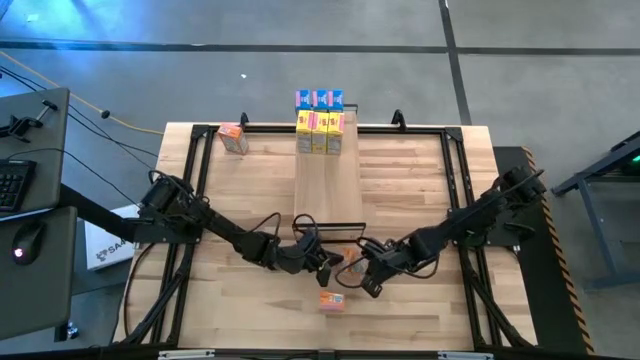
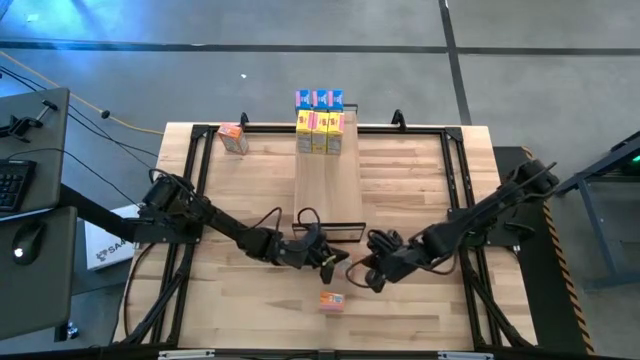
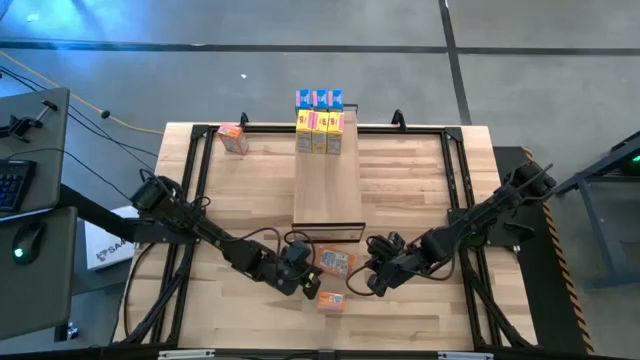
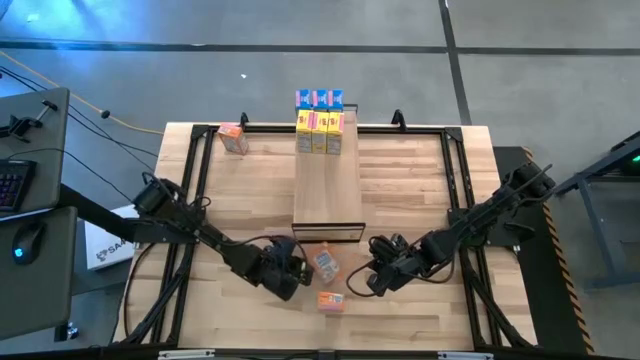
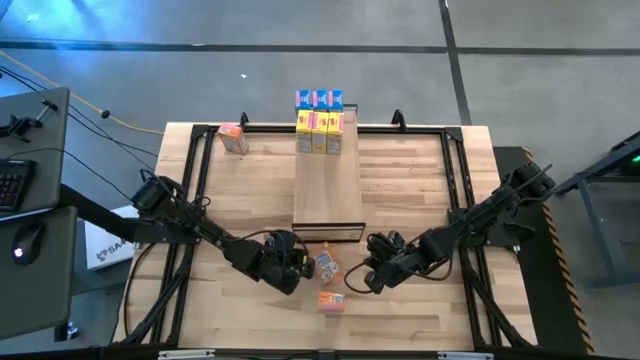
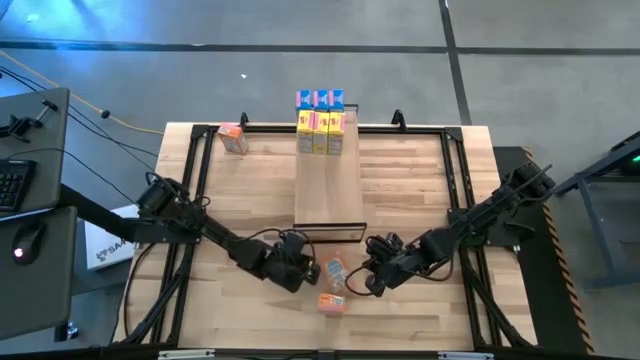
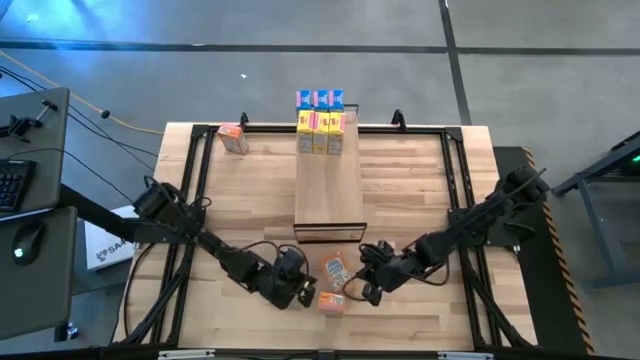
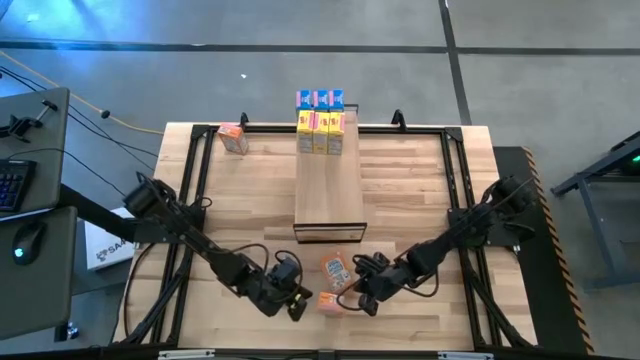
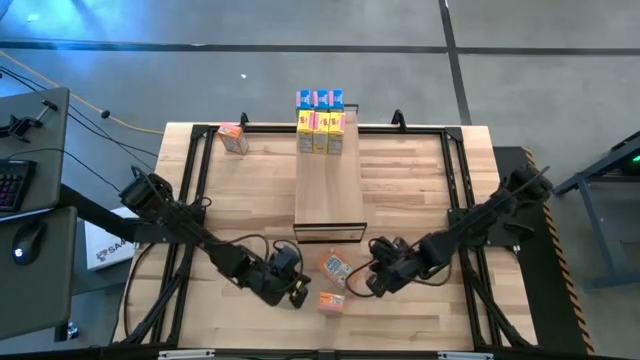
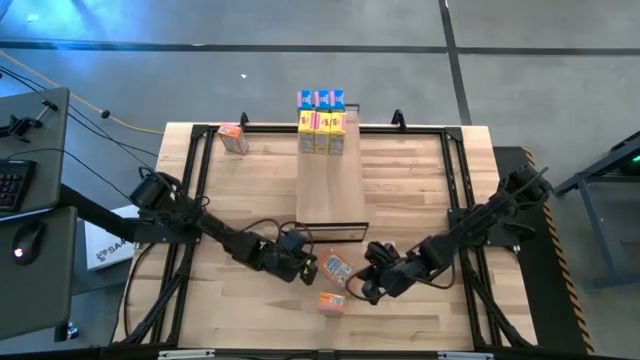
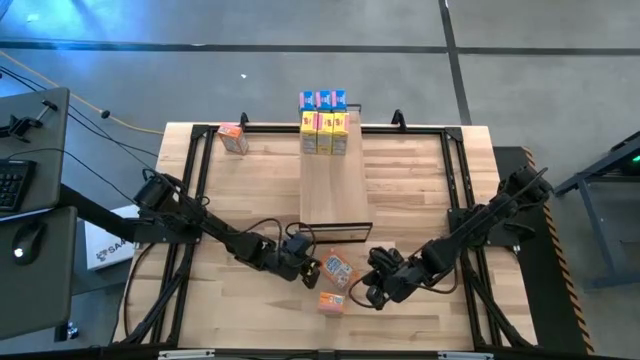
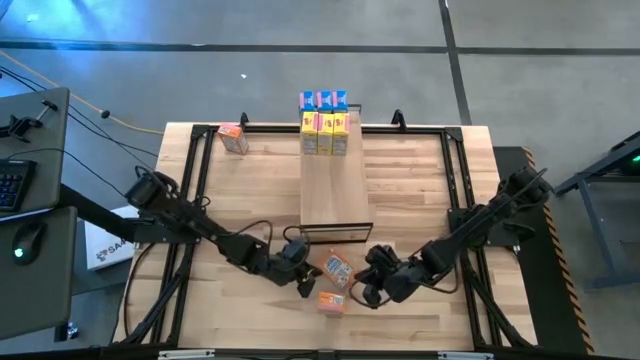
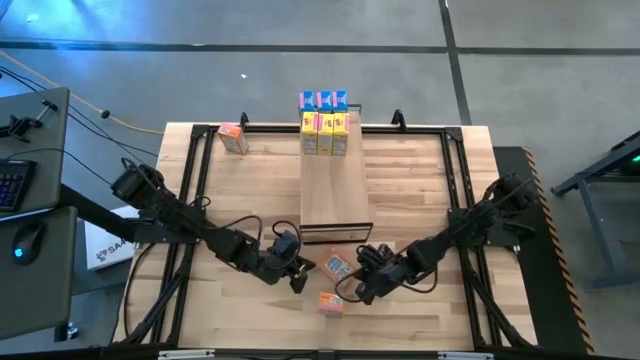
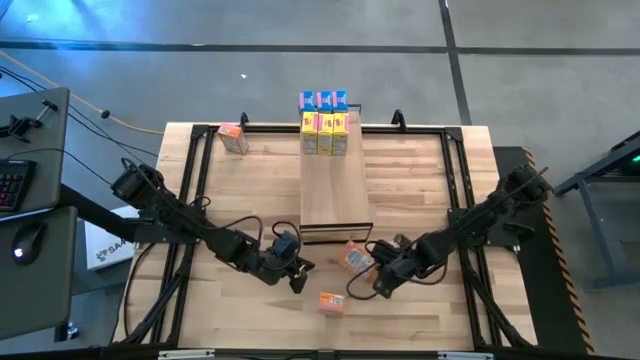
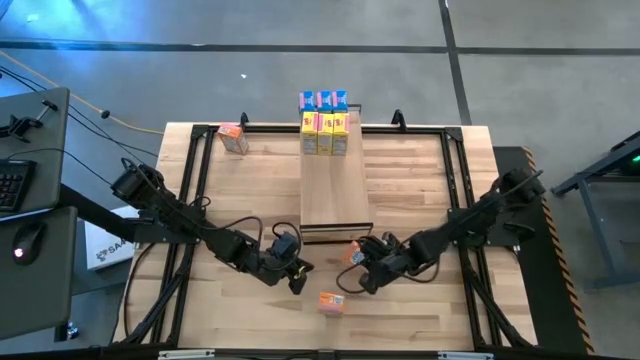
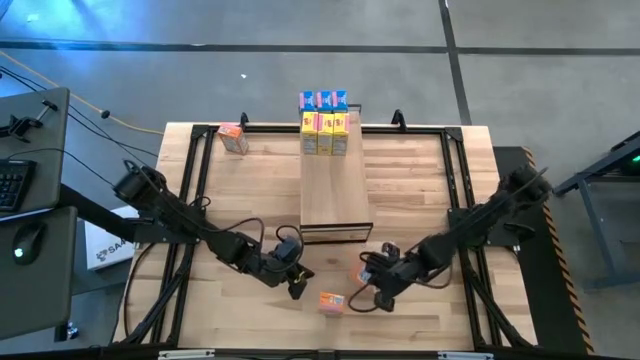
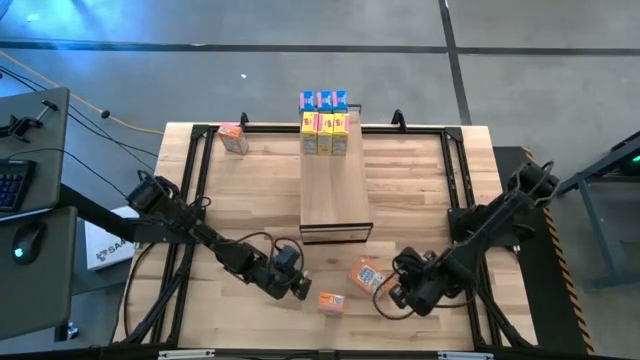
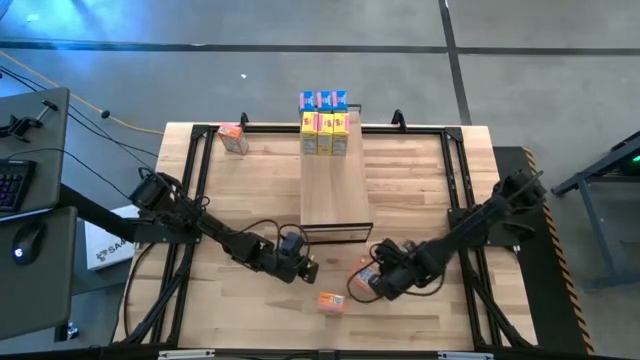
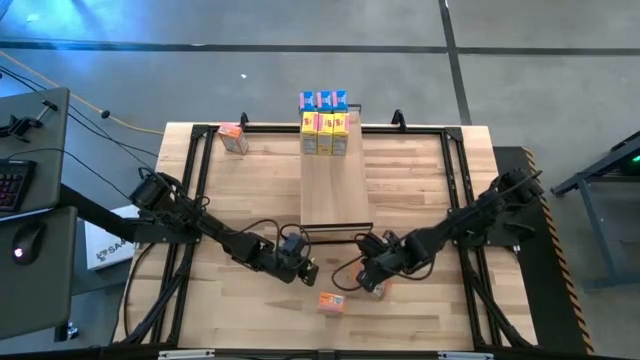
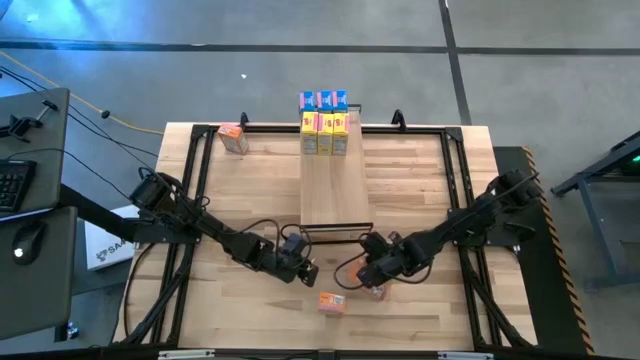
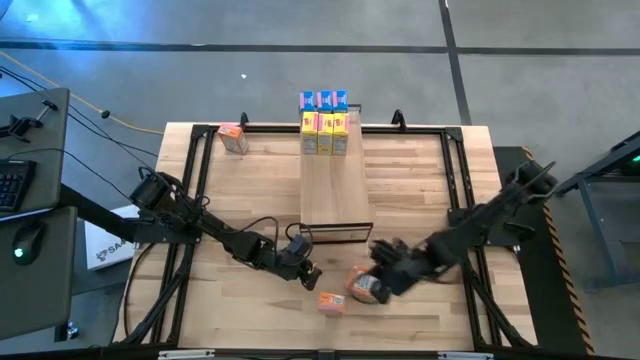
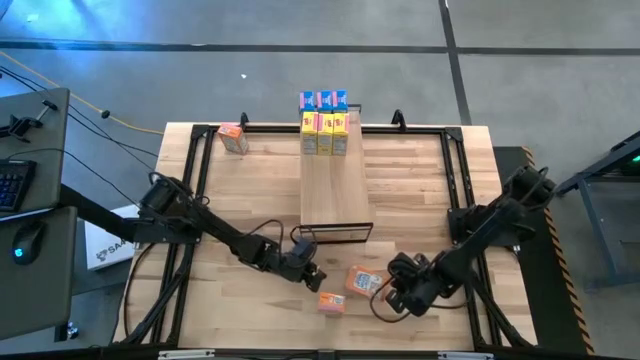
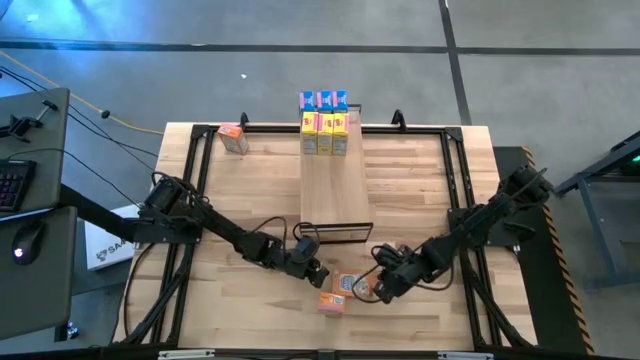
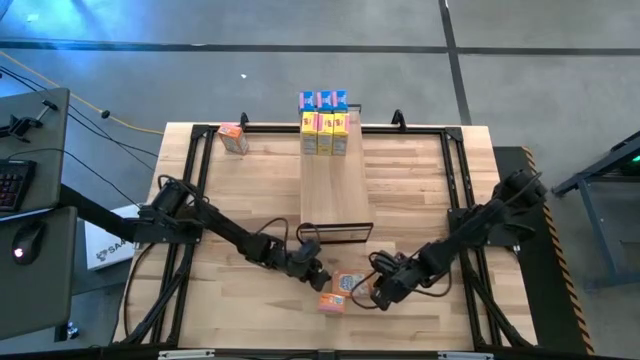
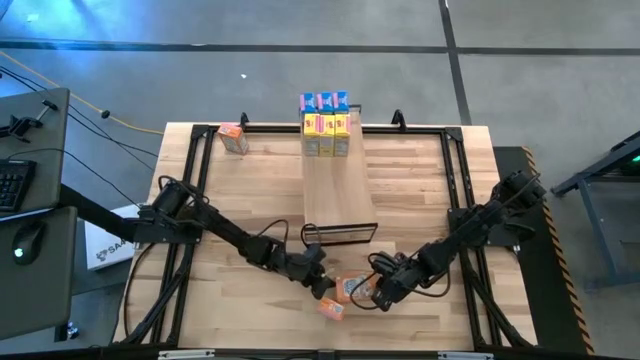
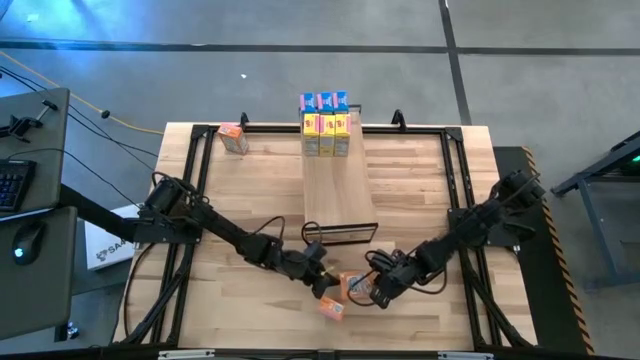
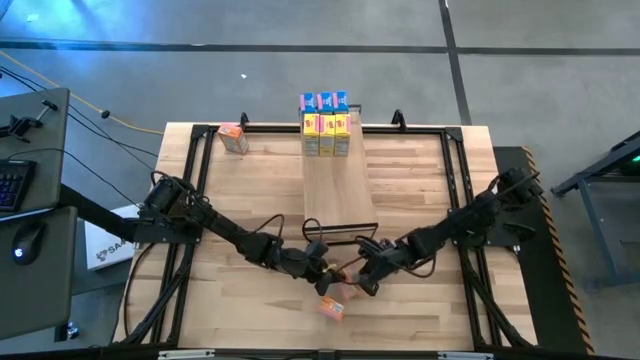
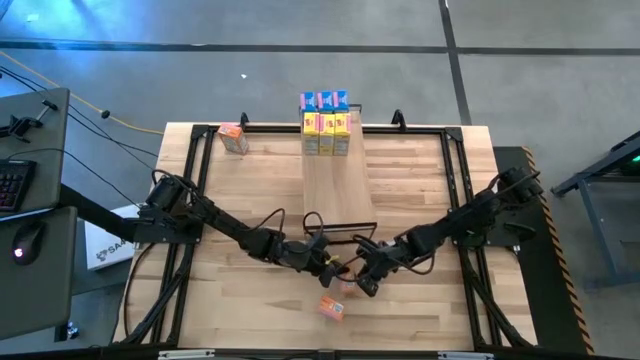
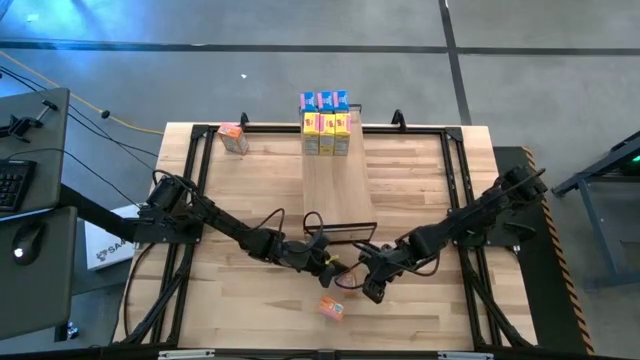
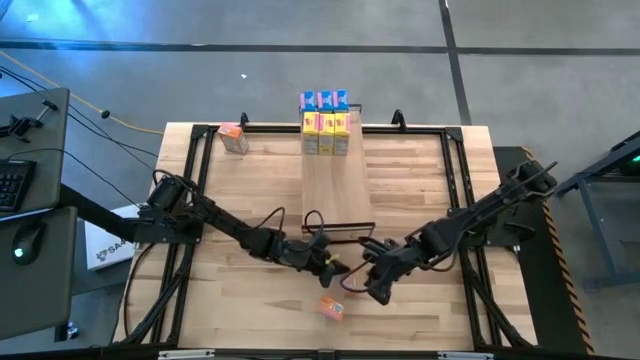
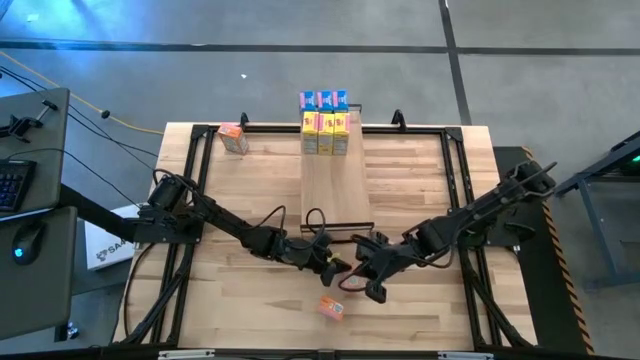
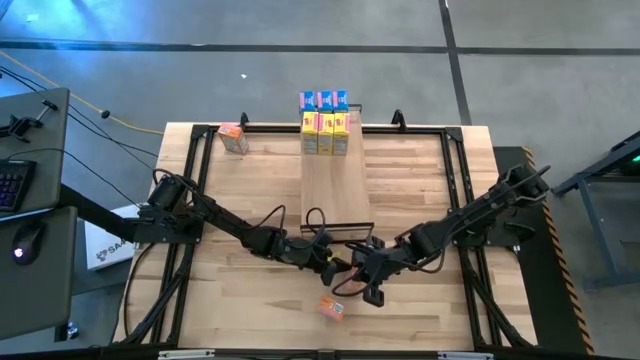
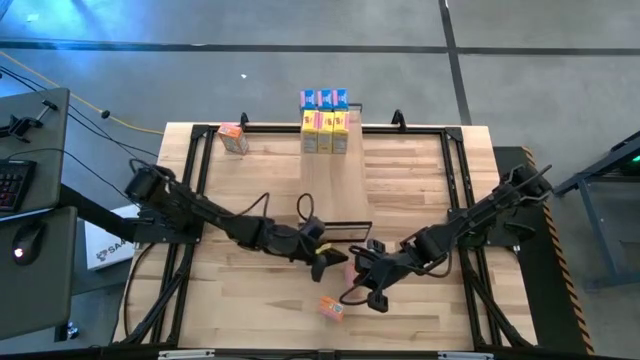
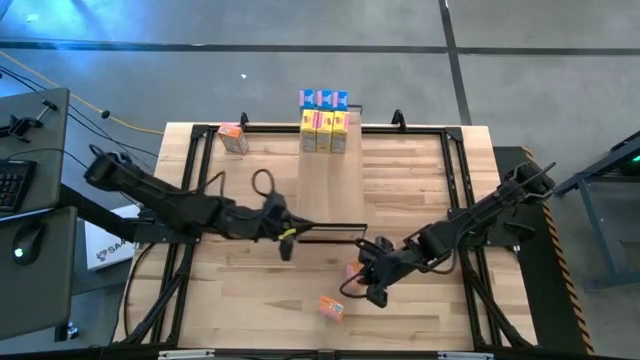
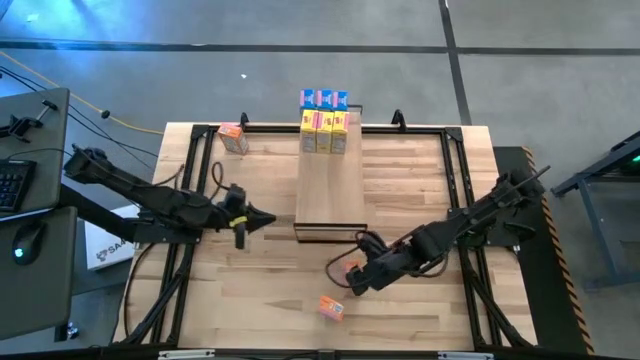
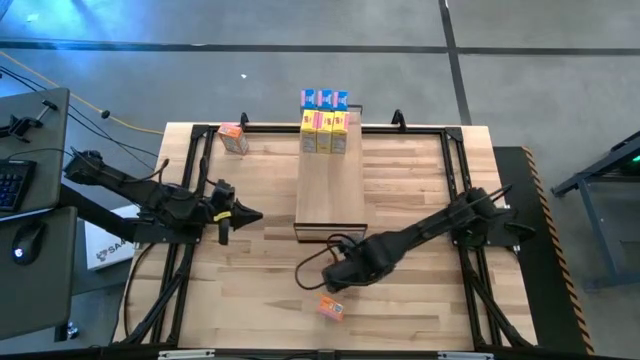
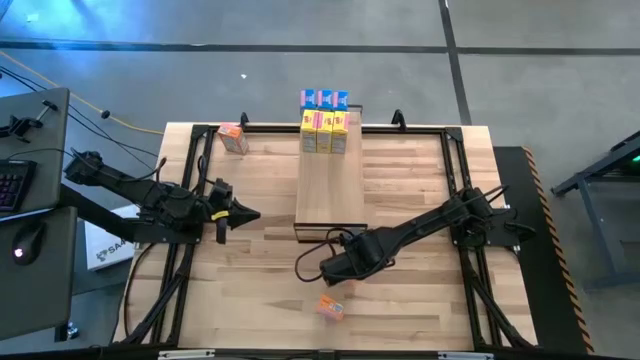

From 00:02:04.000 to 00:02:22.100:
Task: Stack cereal on shelf
Put the bottom right orange cereal box on the shelf

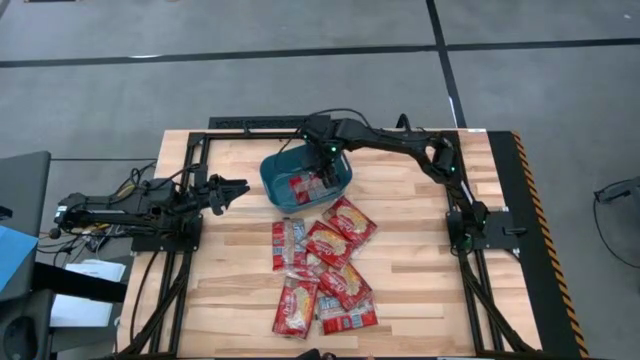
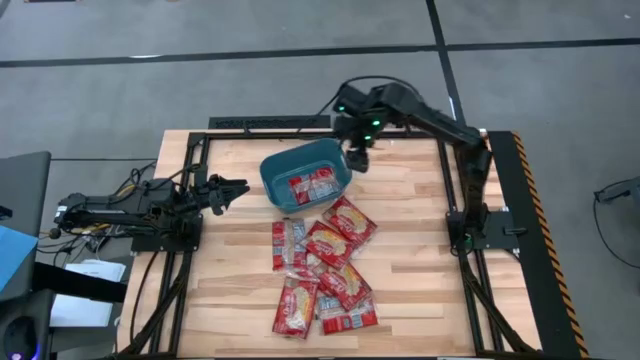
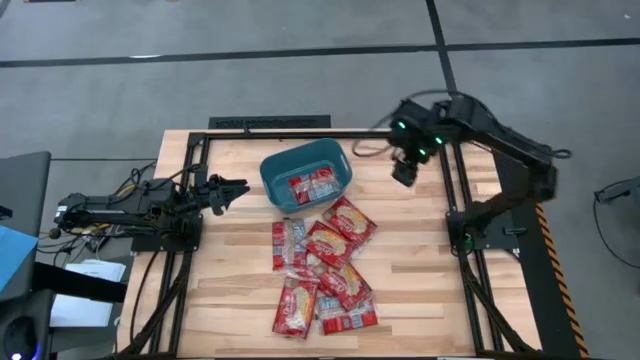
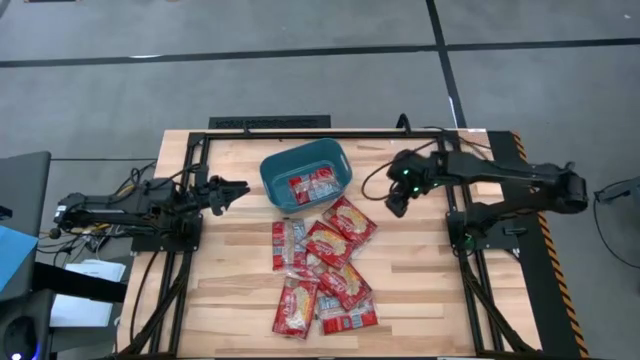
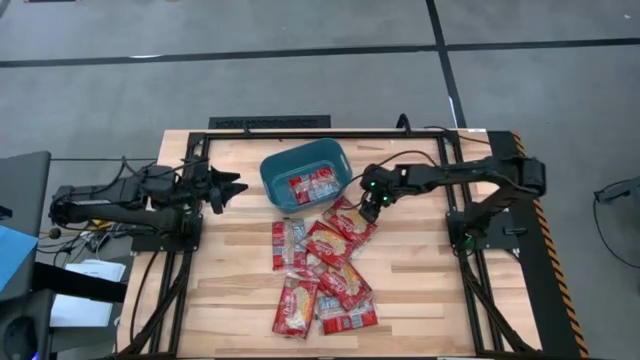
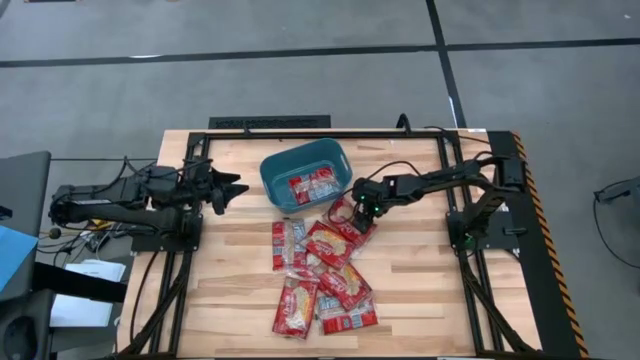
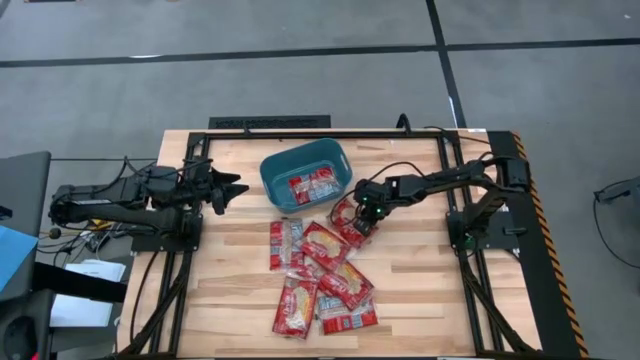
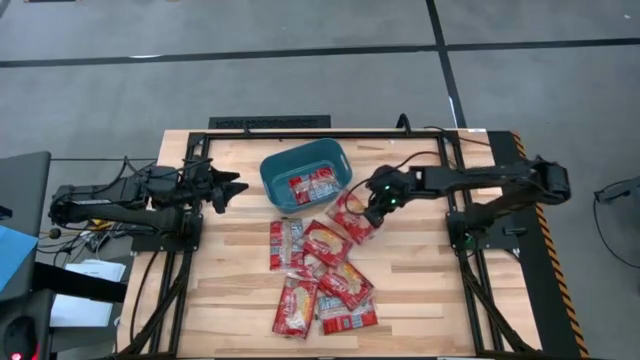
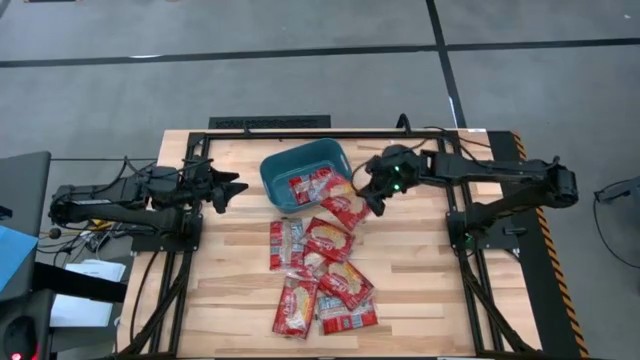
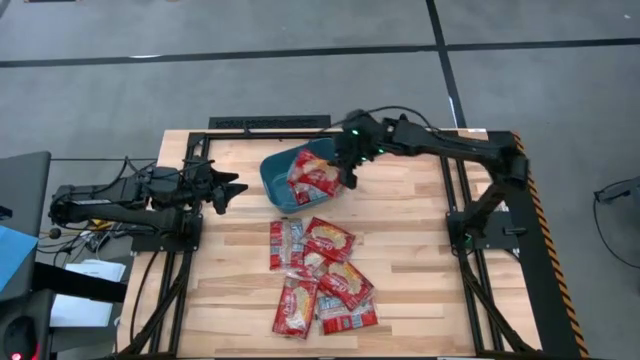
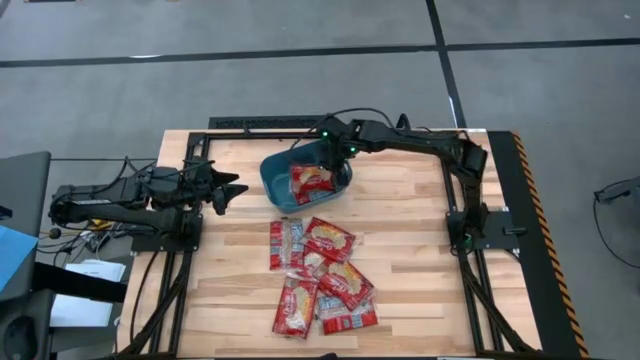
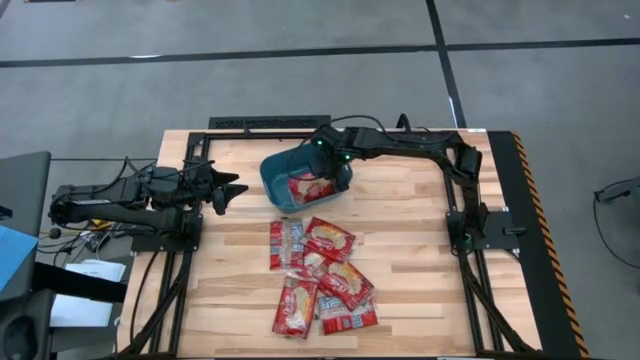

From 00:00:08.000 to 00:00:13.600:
Task: Sort popcorn bags into baskets
Put the red popcorn bag into the blue bin
